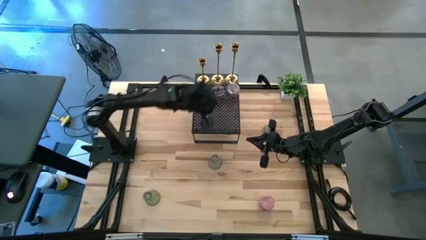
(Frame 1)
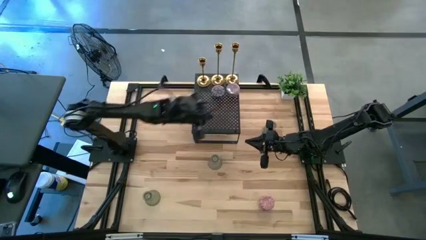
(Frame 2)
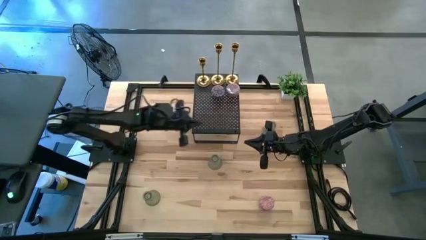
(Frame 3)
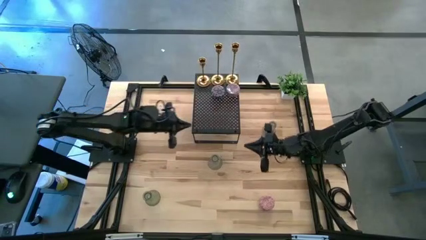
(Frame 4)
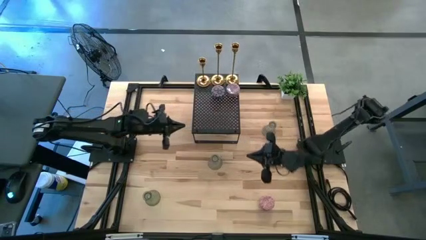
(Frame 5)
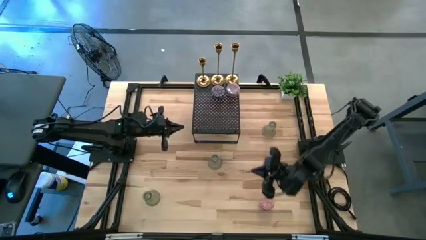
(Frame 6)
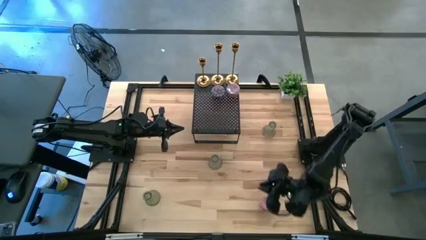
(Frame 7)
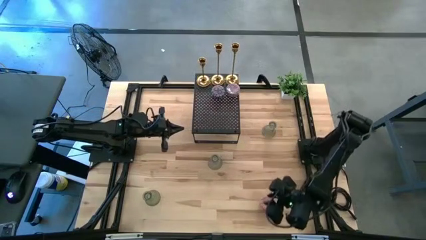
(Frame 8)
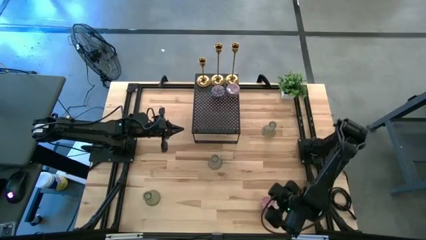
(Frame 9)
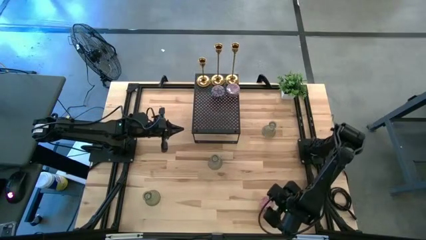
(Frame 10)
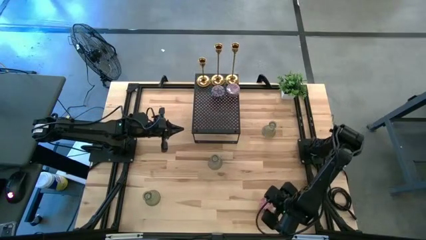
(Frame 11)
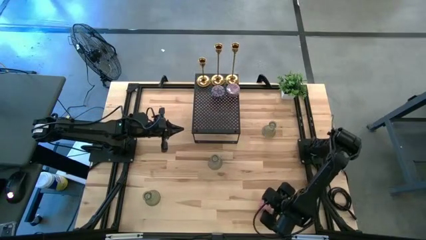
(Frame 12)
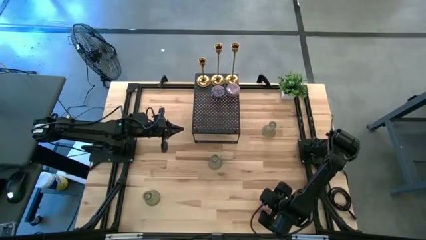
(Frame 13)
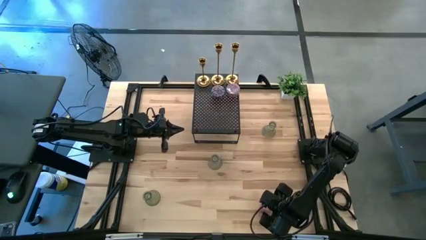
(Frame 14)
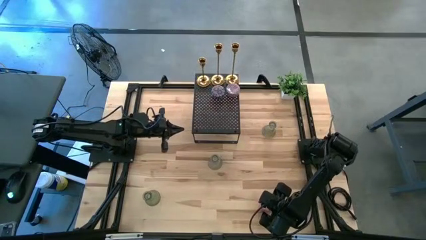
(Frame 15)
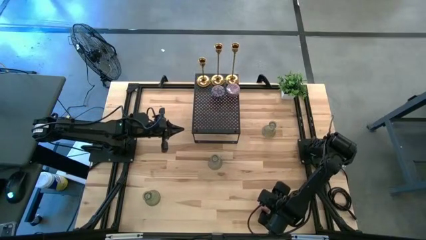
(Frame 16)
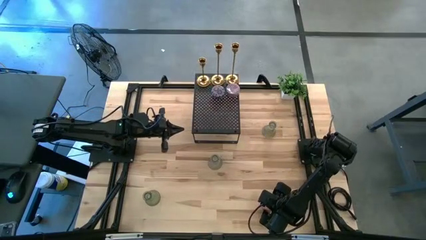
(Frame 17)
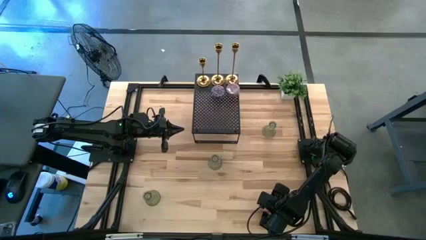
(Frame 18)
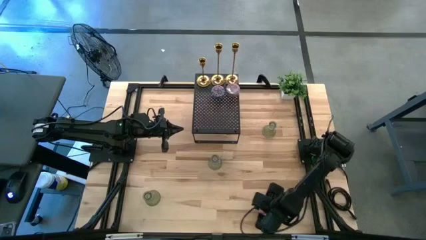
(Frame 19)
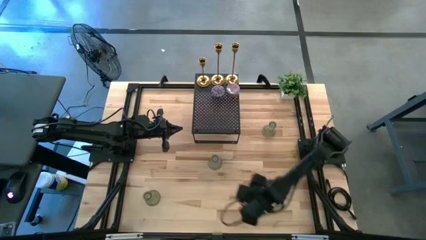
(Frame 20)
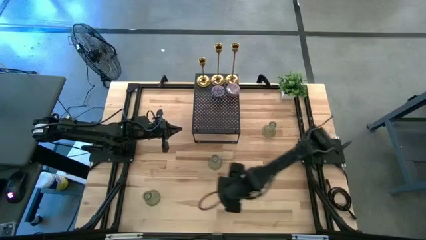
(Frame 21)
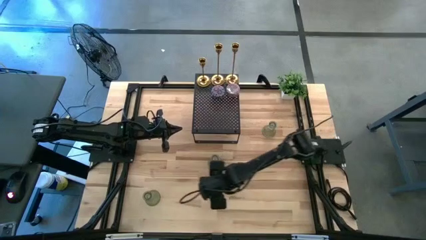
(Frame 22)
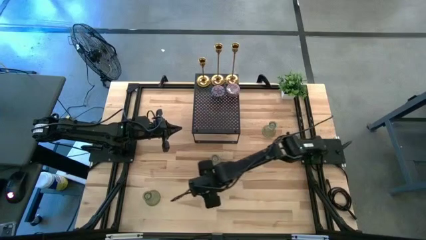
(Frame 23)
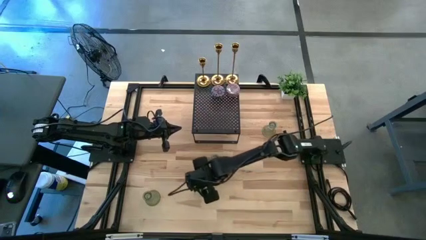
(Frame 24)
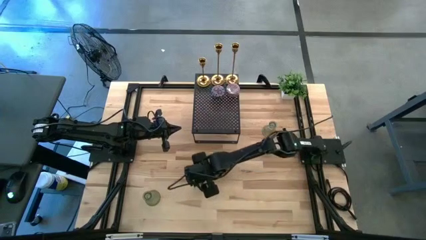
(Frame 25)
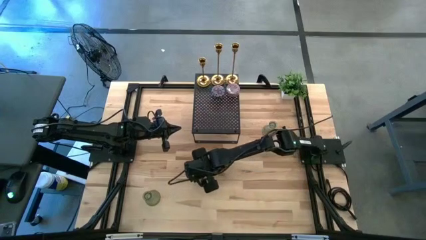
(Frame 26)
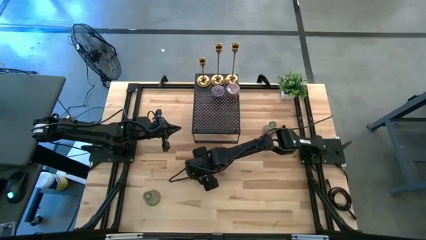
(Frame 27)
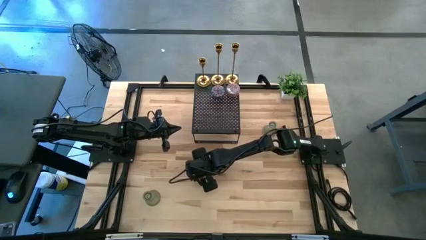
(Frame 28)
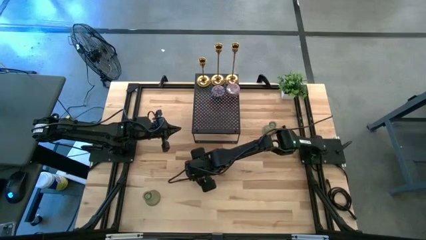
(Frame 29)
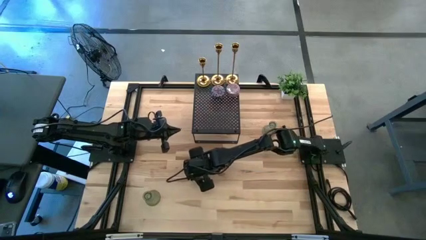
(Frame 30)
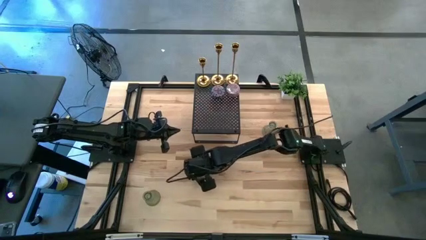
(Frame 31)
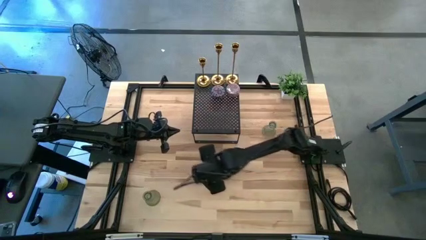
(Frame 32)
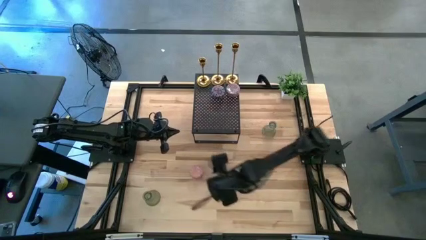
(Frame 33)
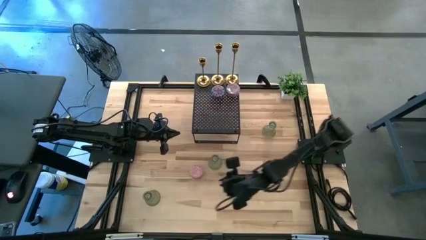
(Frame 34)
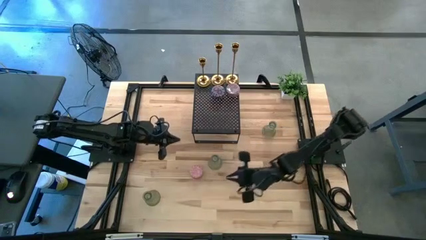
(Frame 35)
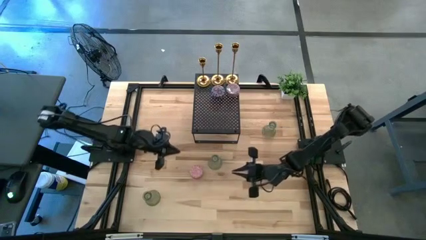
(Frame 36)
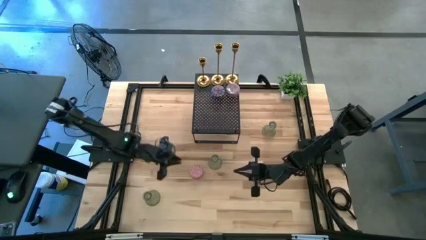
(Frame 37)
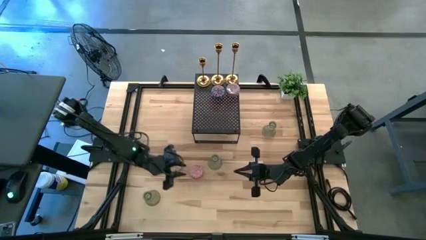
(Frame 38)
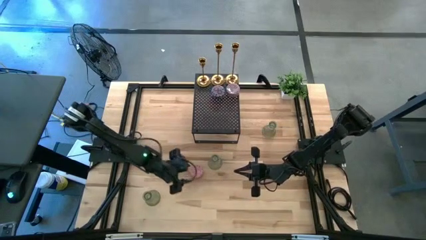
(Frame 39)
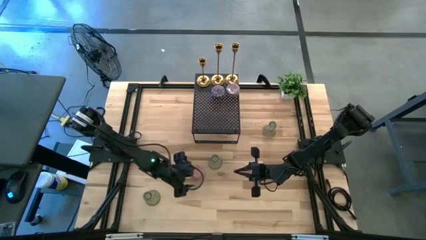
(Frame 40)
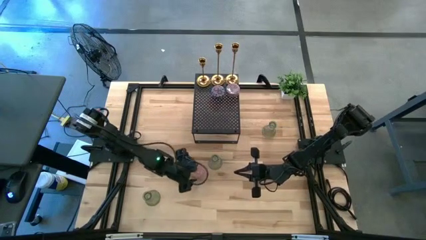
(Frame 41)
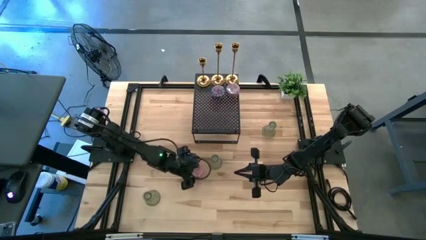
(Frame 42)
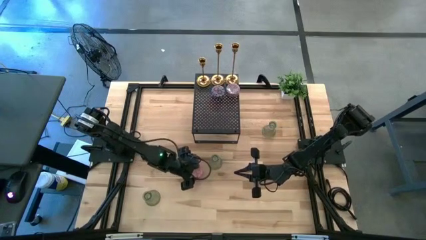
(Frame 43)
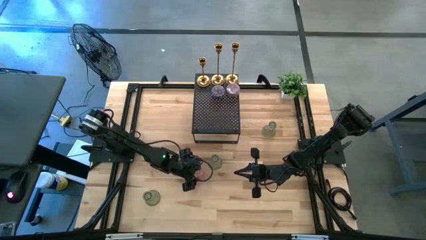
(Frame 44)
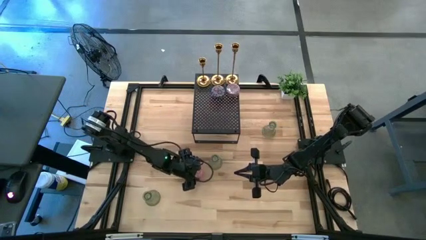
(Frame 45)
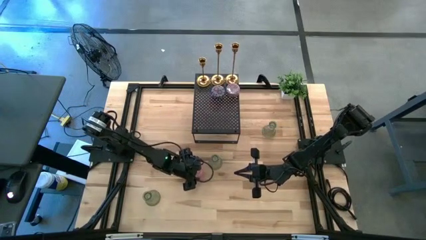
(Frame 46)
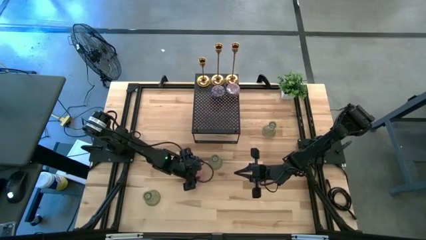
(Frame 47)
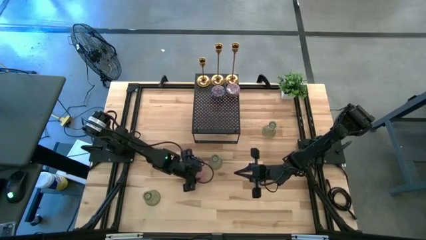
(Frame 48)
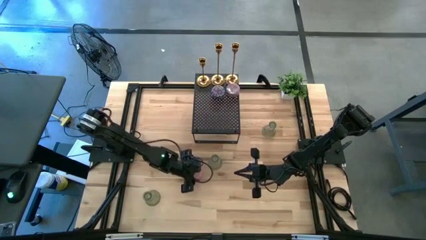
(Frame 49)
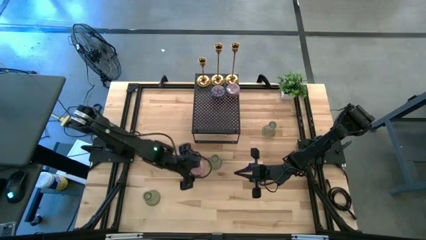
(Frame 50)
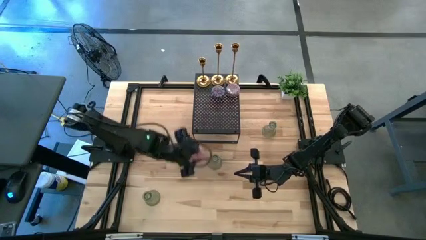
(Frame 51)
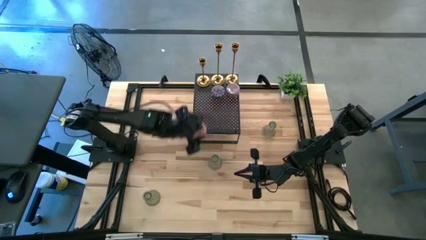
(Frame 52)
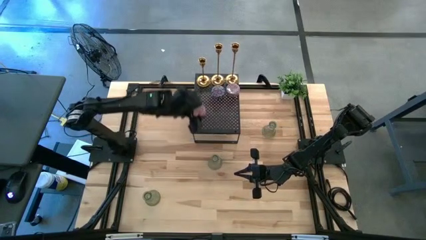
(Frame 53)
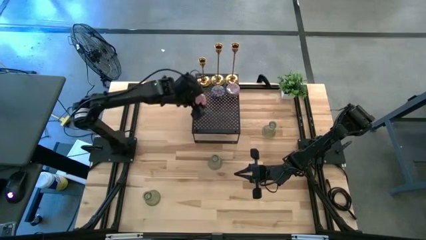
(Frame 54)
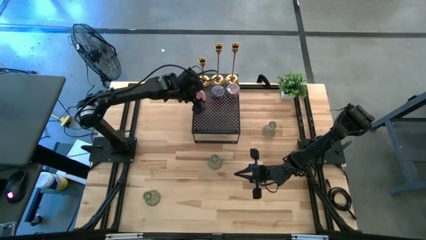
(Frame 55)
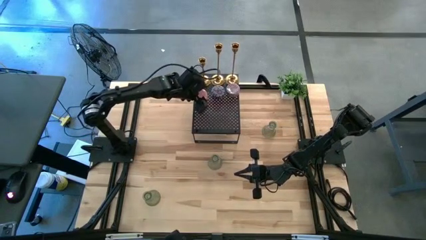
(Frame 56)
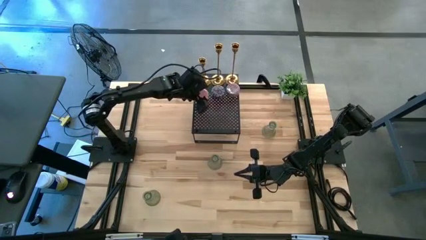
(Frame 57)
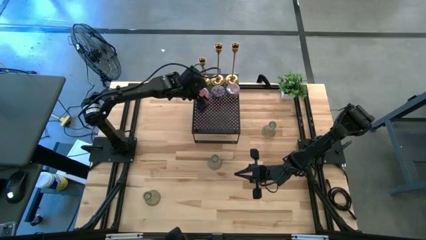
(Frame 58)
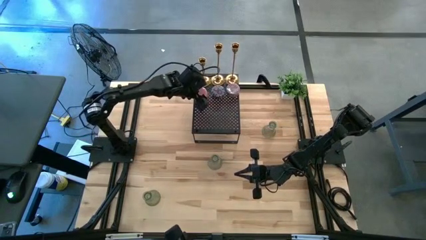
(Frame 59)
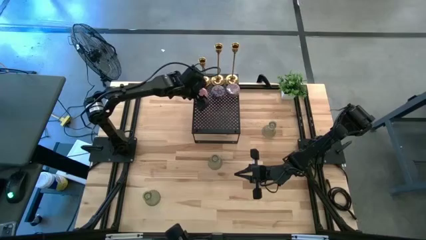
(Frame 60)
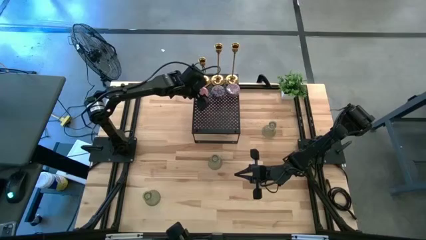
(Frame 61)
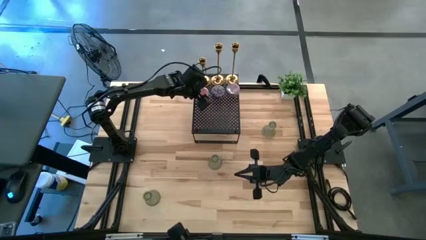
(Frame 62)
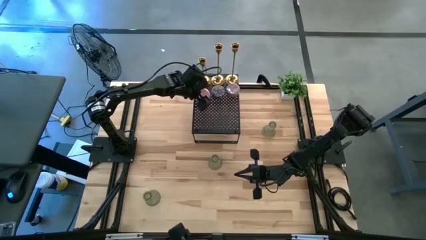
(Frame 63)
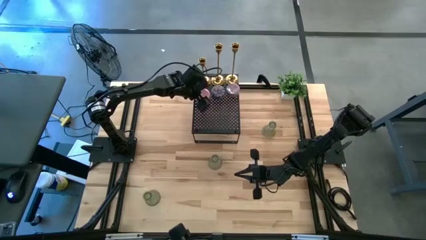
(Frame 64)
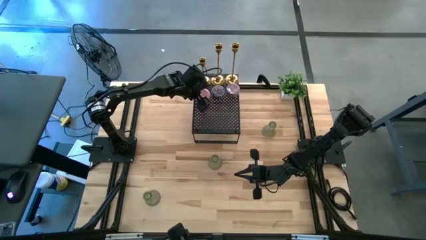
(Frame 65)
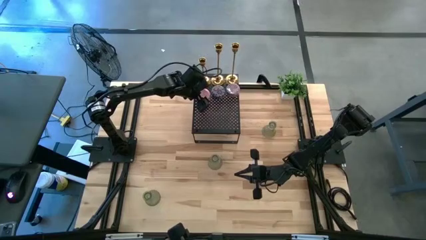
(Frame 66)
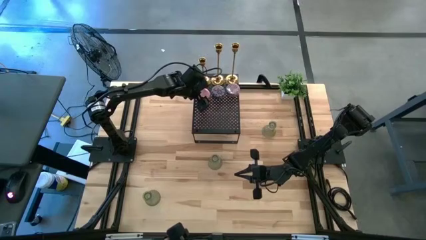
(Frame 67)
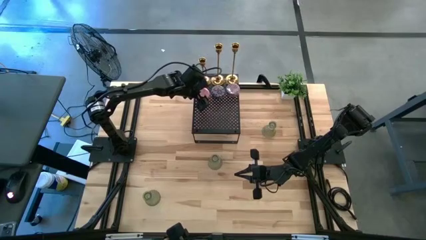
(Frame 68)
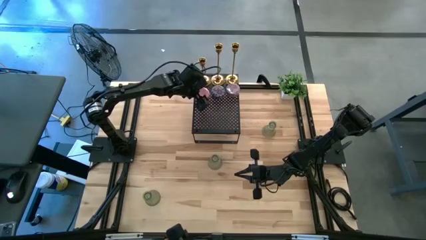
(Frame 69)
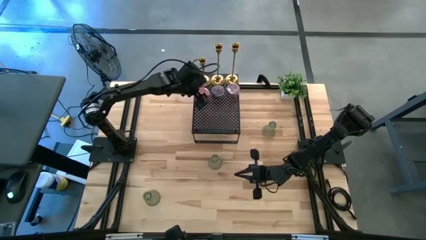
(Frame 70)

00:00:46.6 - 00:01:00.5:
Task: Pick & Place candle stick holders
Put the pink scented candle on the shelf
